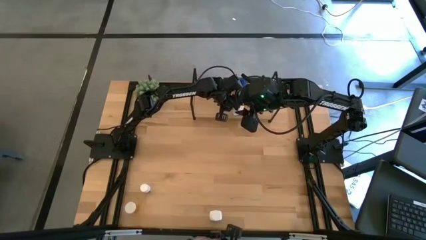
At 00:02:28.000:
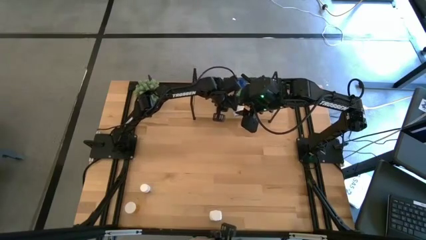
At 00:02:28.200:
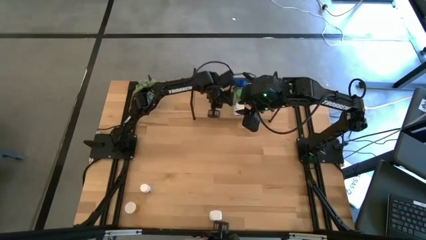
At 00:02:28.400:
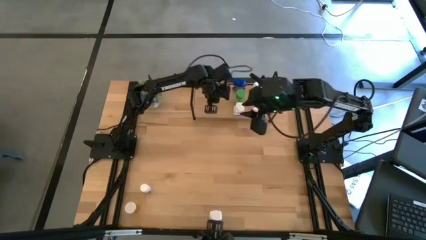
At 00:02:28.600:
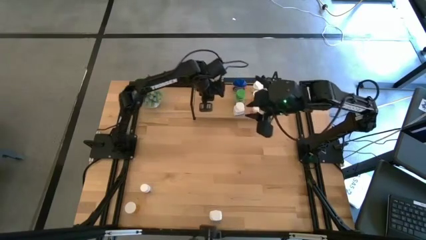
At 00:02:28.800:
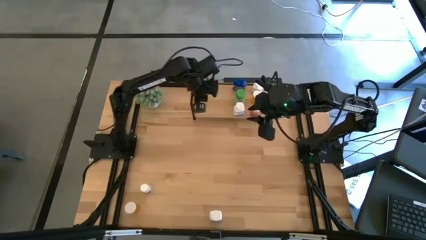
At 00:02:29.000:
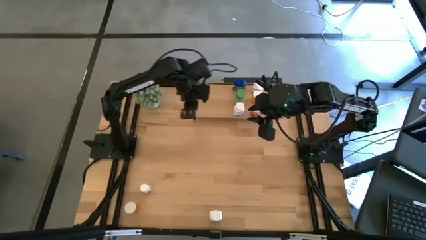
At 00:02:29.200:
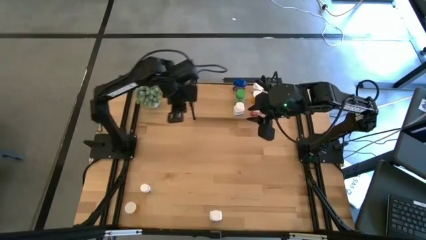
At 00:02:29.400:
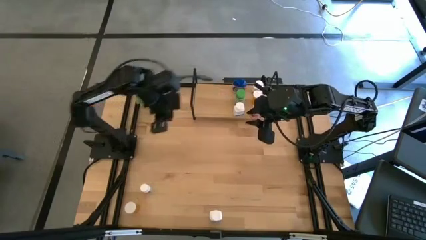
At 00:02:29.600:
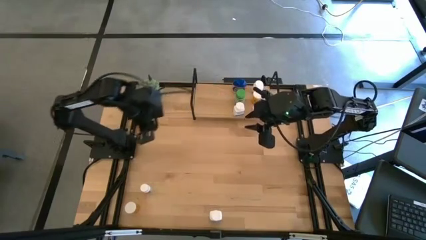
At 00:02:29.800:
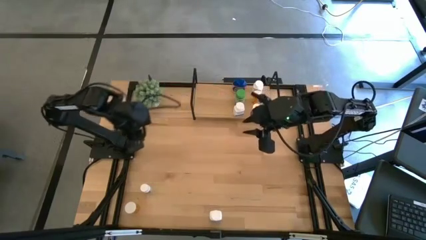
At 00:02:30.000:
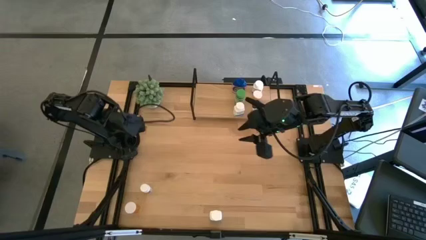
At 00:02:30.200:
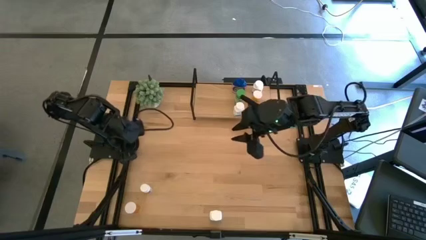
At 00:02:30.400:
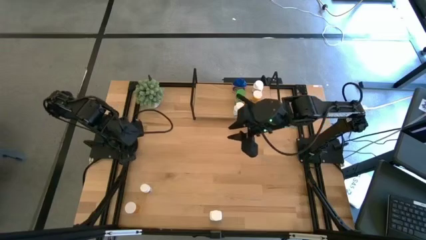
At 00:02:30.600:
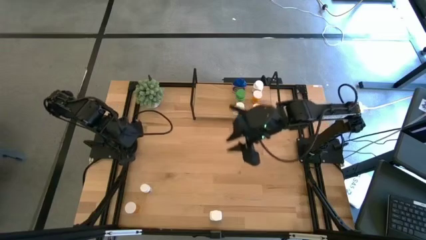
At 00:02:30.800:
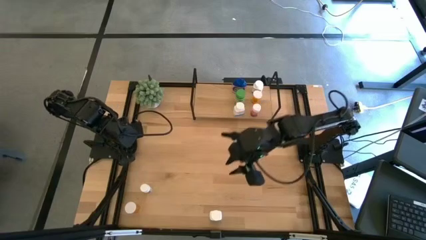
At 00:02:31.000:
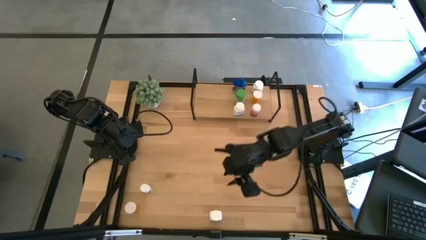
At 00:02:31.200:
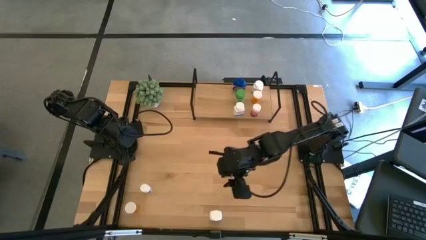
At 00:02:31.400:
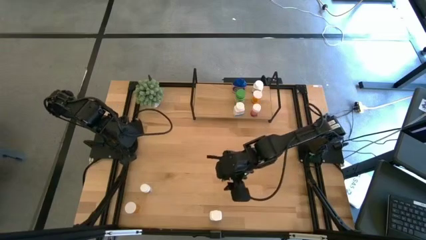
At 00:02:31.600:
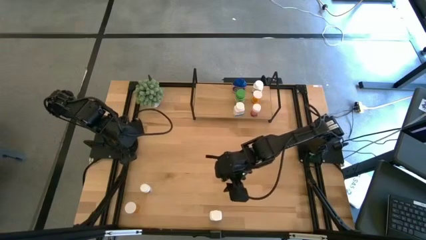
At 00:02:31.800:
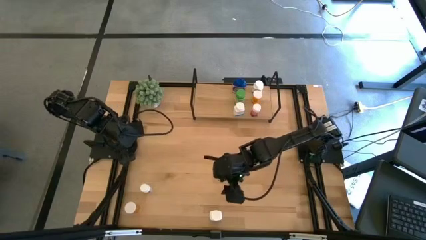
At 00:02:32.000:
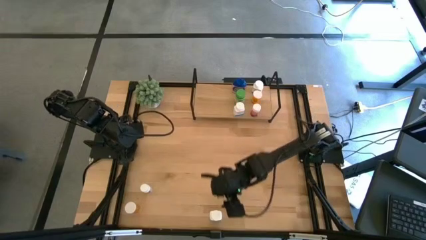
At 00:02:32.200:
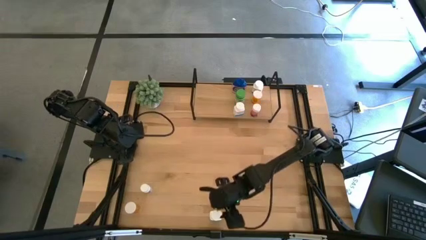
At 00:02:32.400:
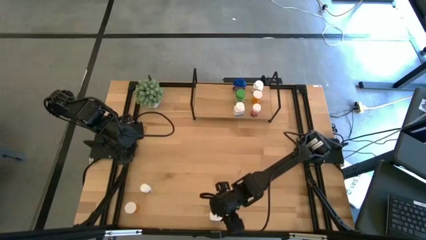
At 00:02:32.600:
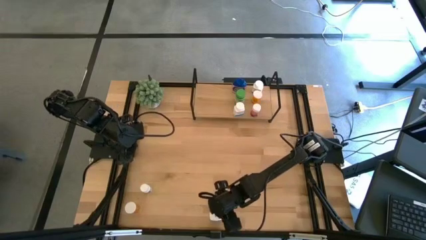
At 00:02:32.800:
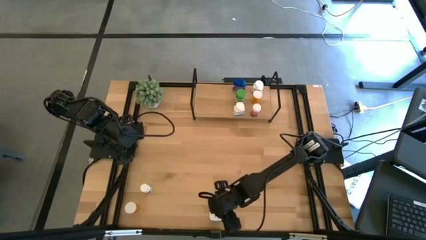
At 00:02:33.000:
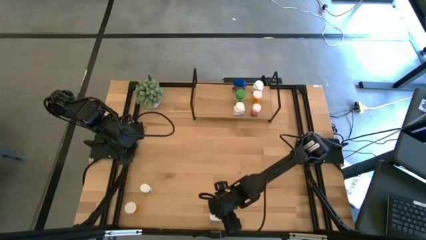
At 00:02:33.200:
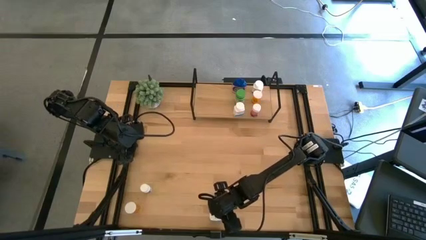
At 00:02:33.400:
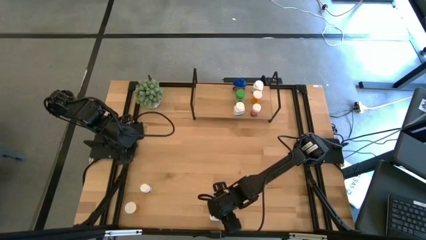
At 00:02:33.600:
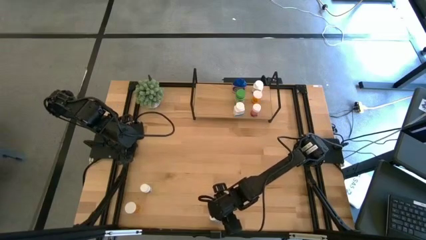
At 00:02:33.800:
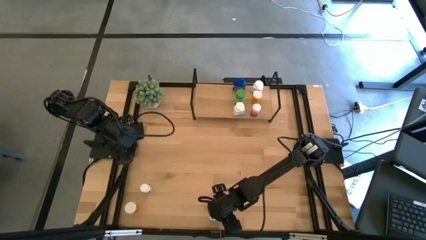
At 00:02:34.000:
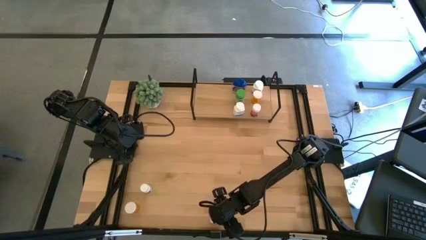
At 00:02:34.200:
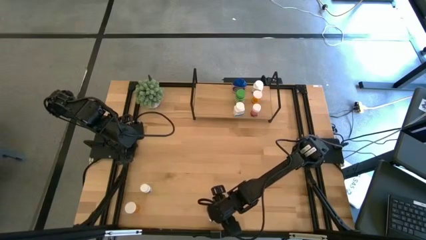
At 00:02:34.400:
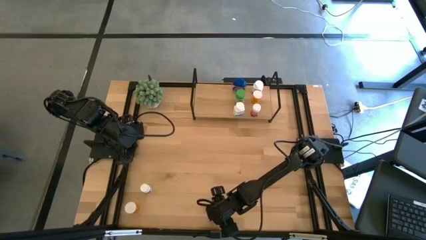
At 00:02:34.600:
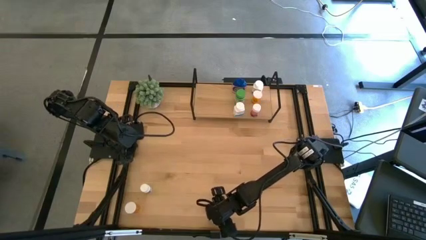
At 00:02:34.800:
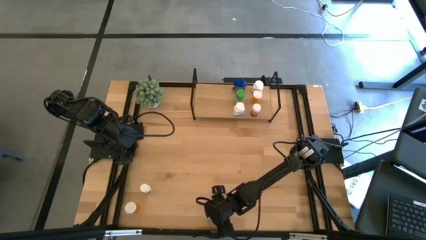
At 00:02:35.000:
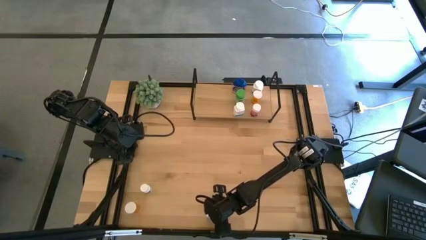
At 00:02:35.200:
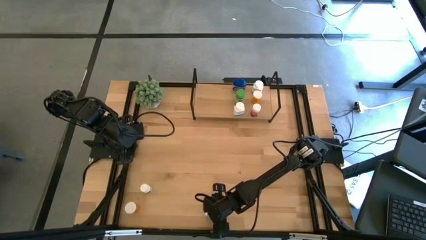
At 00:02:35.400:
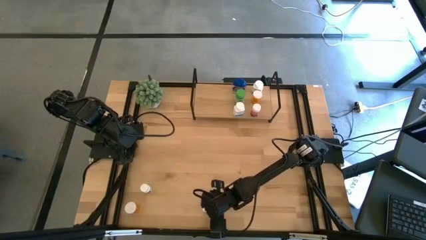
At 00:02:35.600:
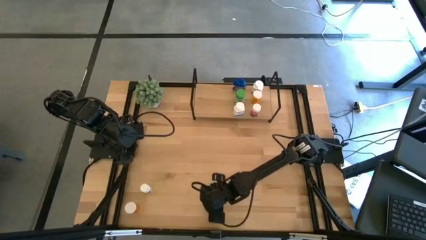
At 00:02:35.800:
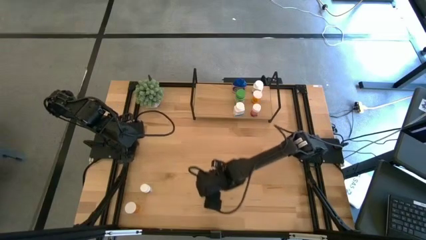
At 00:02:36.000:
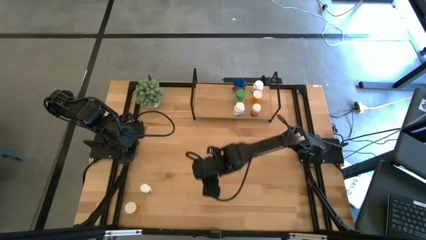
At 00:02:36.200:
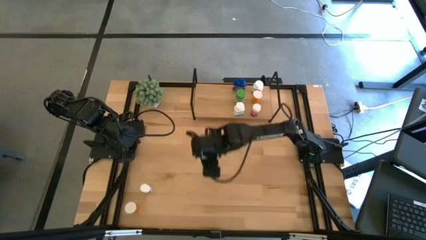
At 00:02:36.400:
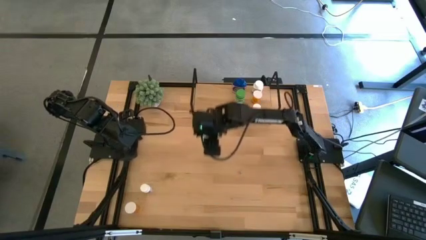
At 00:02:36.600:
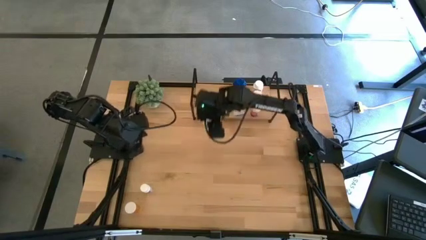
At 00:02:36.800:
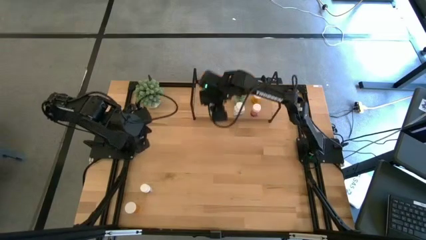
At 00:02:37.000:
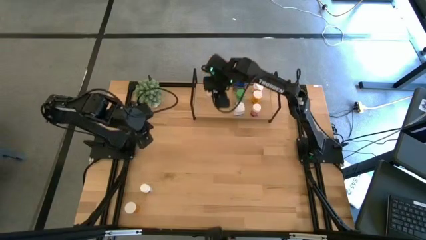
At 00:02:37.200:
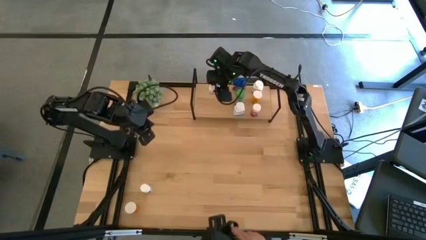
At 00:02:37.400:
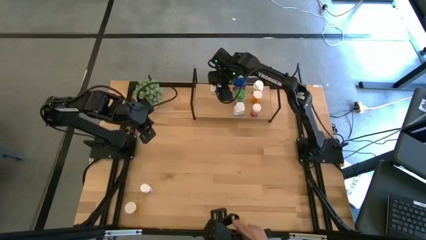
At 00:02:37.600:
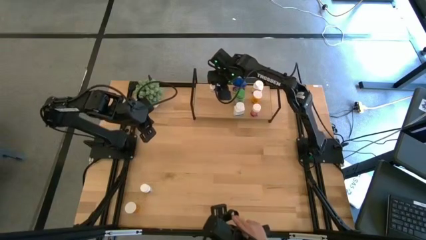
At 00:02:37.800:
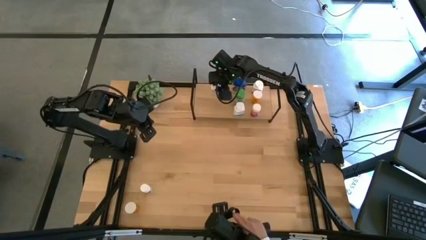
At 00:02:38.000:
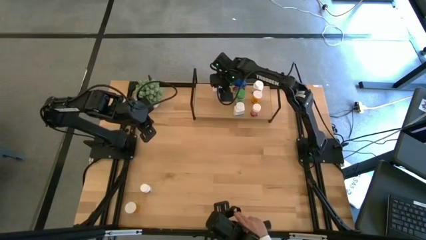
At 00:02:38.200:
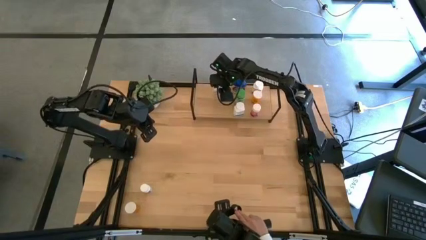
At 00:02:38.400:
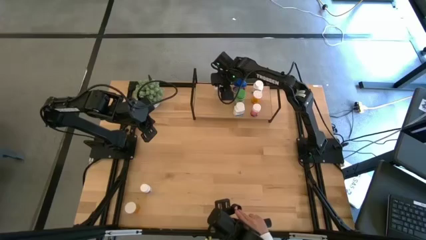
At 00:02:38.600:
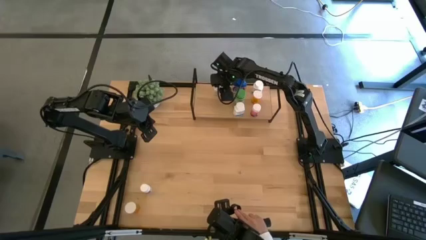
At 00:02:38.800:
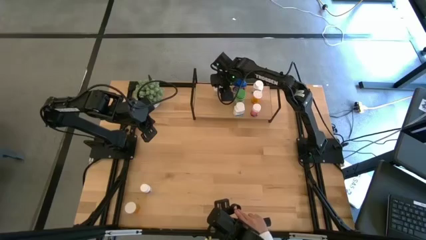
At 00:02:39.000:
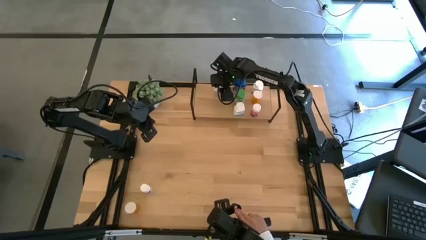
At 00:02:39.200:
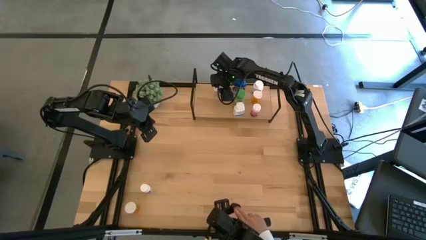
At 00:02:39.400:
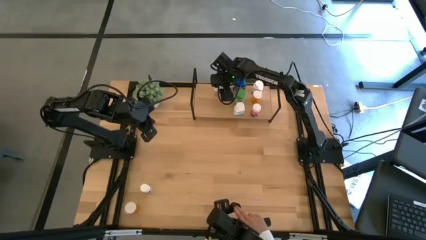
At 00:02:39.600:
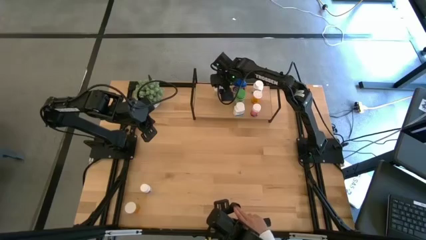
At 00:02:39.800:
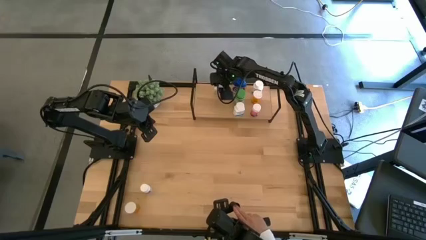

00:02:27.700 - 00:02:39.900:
Task: Pick and place medicine bottles onto shelf by color
Put the white blue medicine bottle on the shelf

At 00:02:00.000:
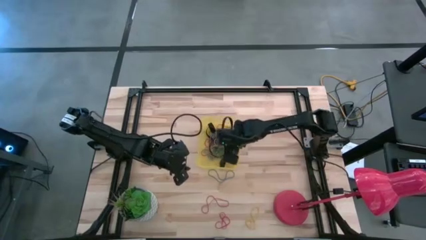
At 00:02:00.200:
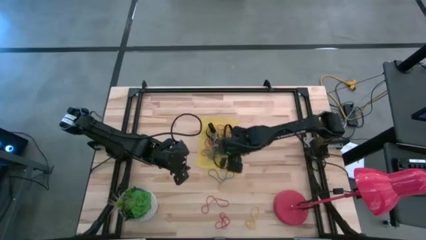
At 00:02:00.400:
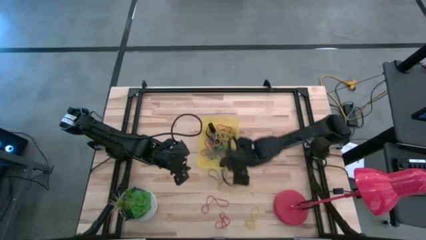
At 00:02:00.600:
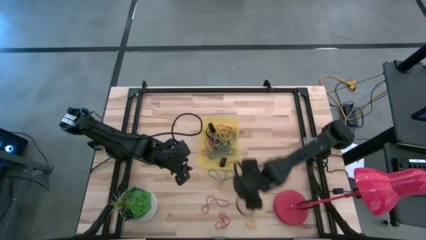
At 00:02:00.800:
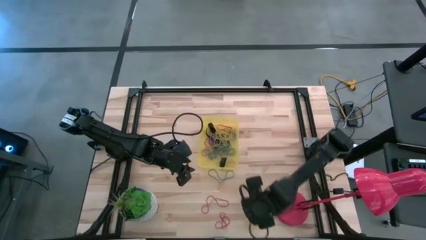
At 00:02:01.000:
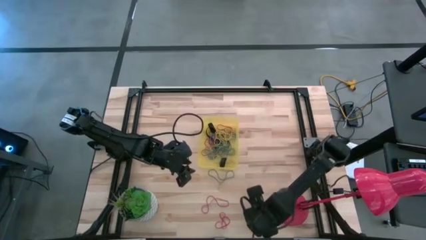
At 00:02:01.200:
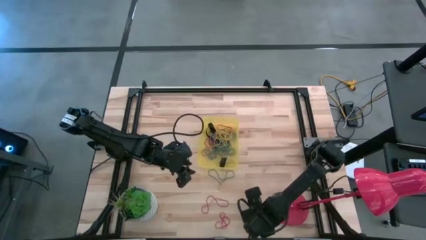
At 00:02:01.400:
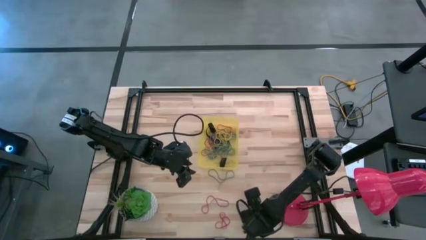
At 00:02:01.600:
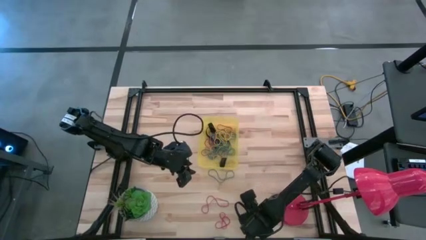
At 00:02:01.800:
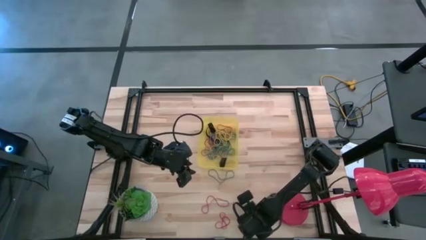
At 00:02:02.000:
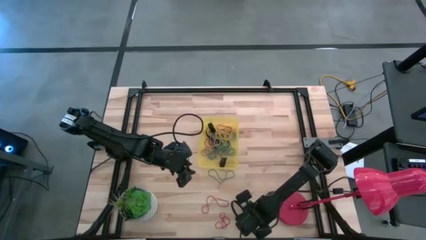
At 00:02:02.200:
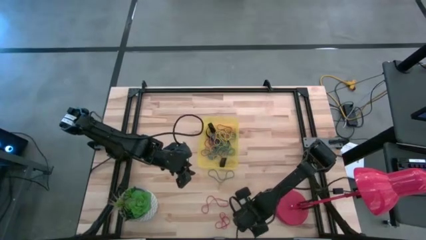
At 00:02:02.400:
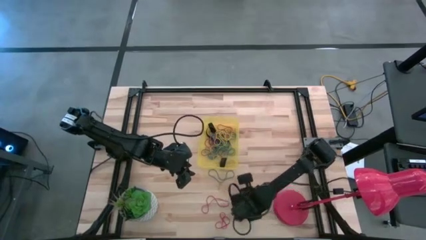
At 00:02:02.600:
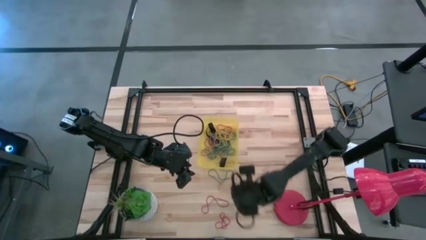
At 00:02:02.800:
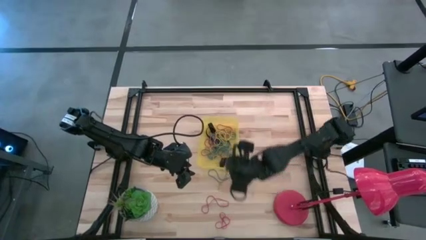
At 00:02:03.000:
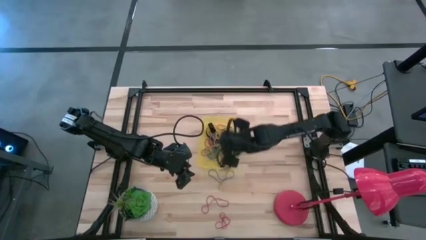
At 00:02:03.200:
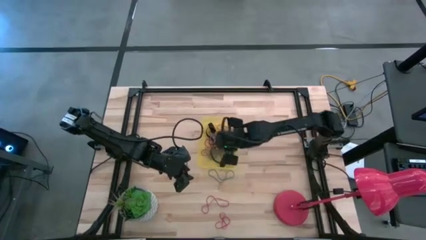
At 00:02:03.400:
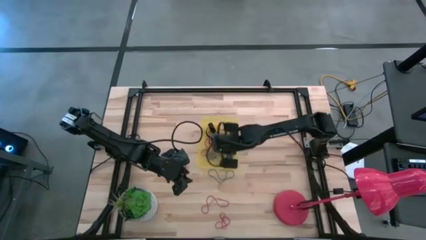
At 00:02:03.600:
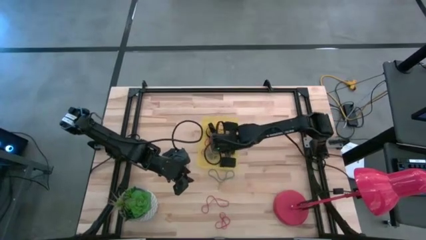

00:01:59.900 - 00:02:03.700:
Task: Pick and place rubber bands into bin
Put the yellow rubber band into the yellow bin
